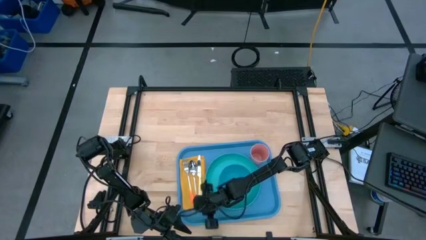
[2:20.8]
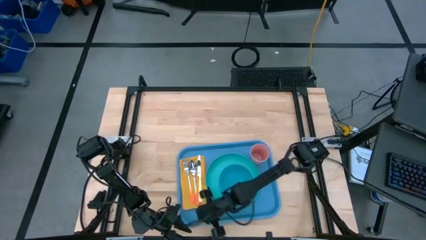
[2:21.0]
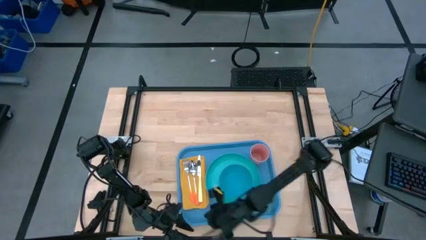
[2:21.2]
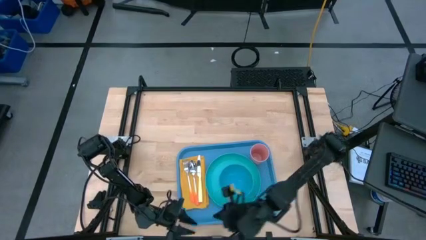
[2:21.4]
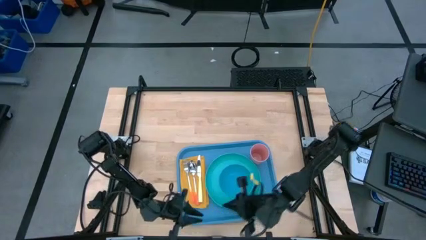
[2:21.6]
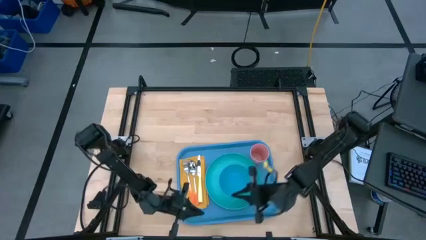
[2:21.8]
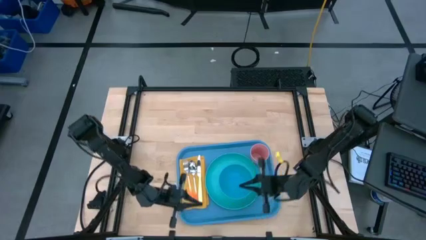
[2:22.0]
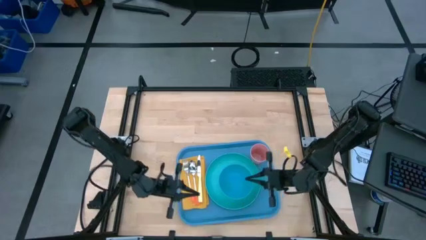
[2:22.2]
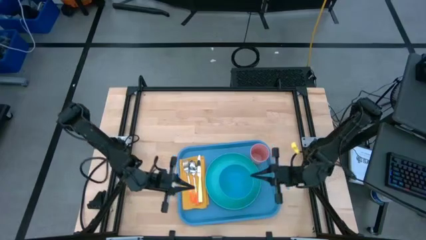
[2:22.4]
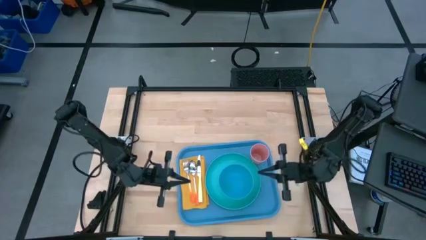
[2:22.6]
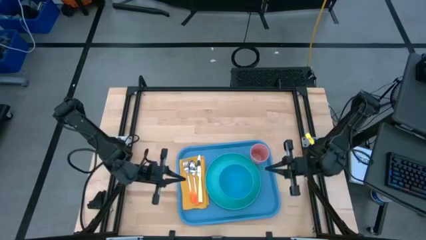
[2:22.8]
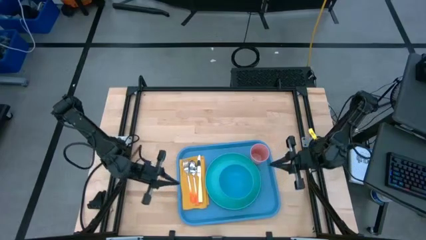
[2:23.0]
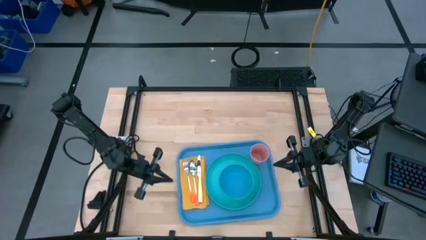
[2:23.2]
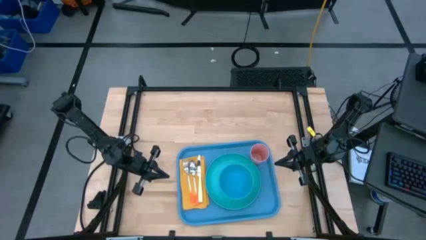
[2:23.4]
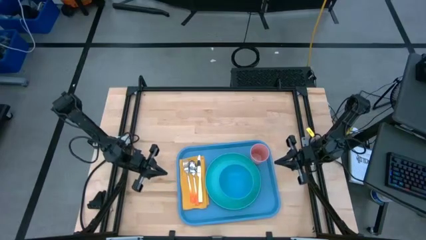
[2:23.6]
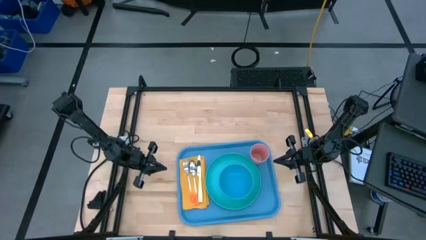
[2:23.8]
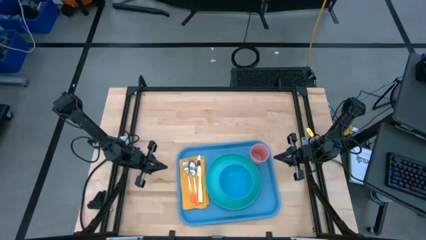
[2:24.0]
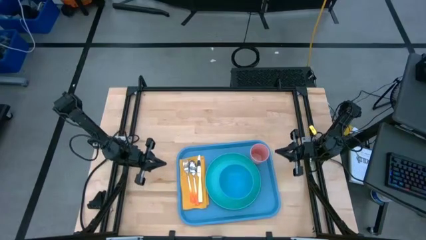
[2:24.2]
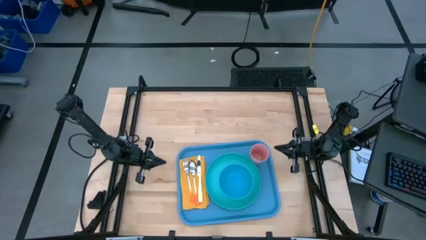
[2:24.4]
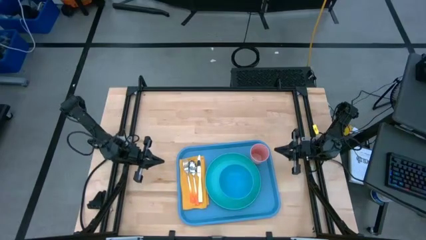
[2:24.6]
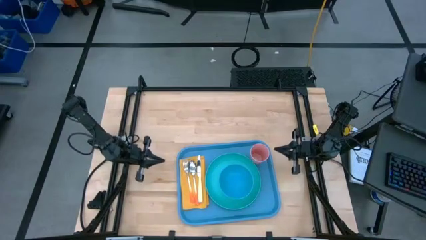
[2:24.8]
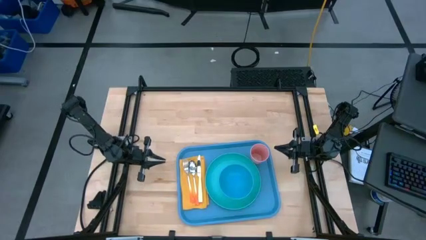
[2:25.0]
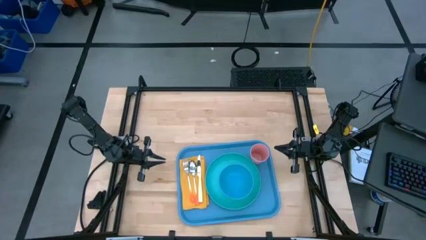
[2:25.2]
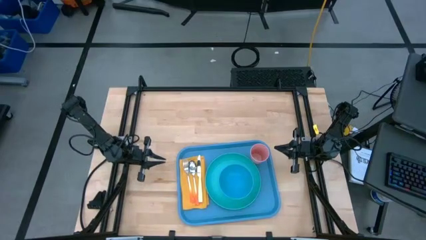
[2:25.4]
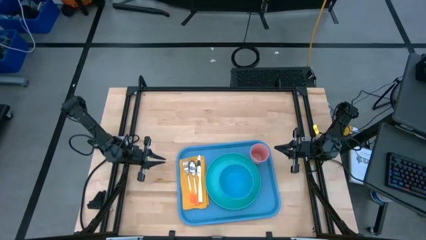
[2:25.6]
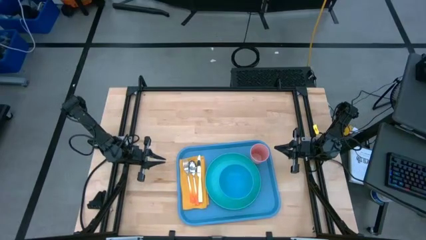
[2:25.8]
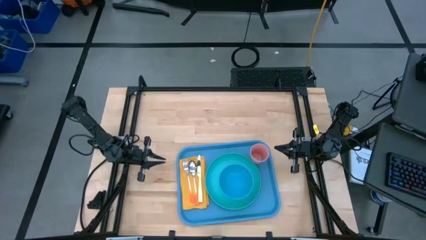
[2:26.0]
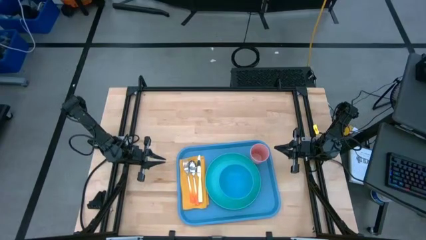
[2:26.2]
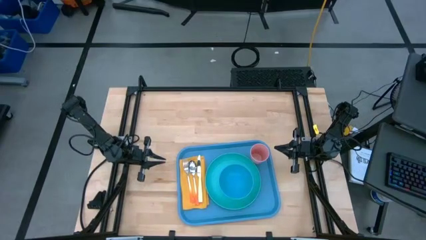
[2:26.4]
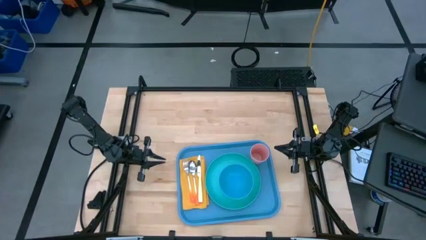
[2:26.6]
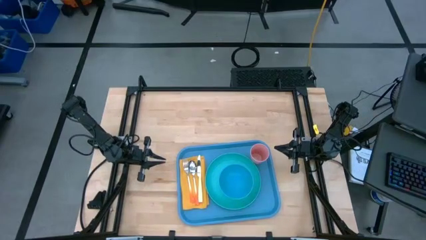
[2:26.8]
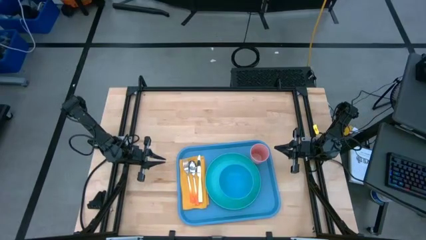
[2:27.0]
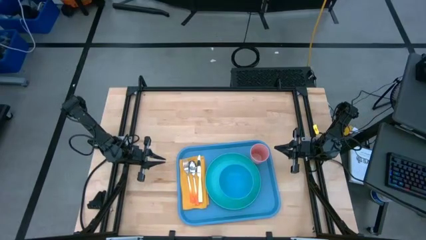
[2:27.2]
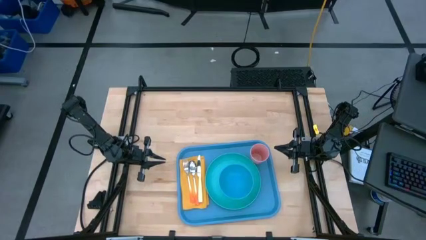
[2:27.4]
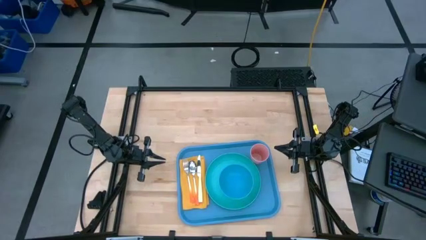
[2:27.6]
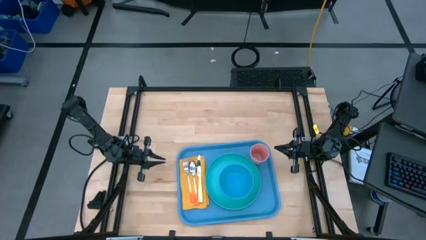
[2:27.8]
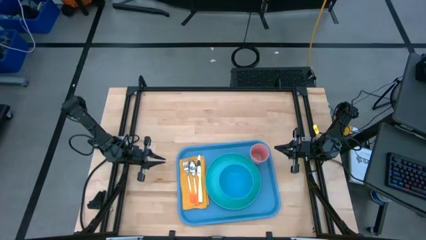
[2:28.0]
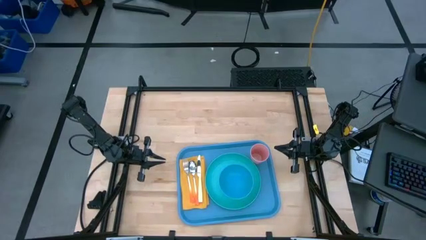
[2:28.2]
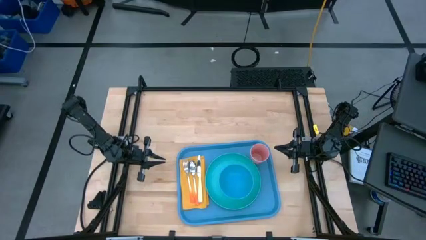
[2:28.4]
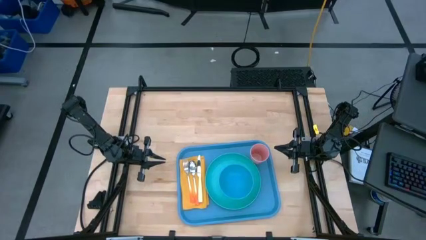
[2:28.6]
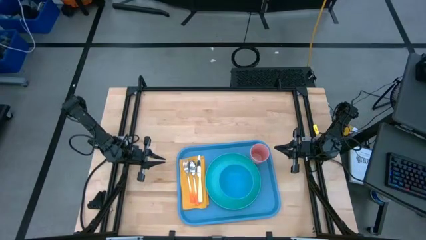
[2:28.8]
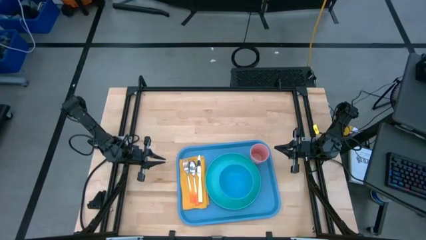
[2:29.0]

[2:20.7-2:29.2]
Task: Set up tray
Return to Home Position

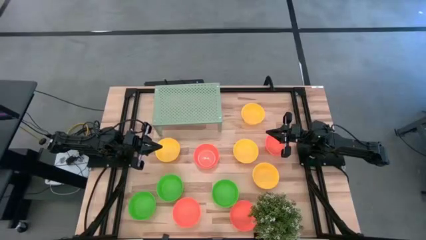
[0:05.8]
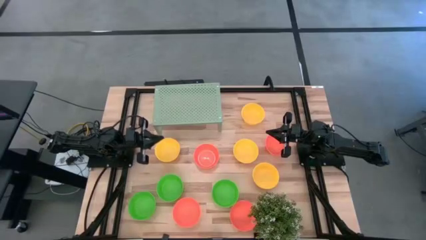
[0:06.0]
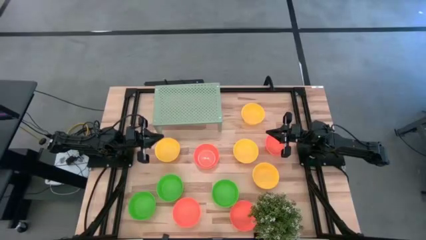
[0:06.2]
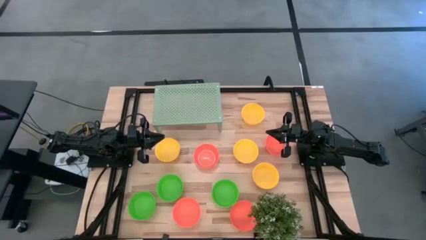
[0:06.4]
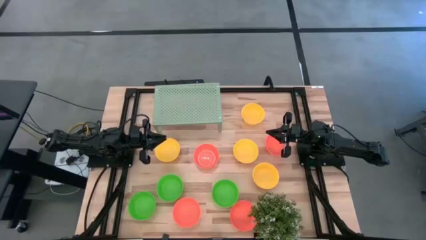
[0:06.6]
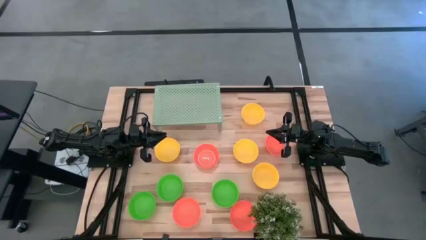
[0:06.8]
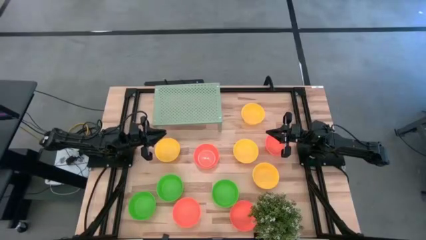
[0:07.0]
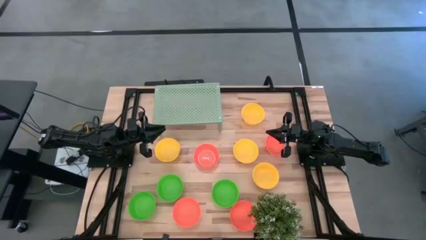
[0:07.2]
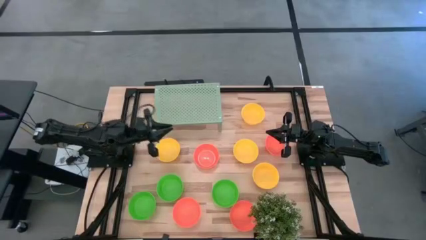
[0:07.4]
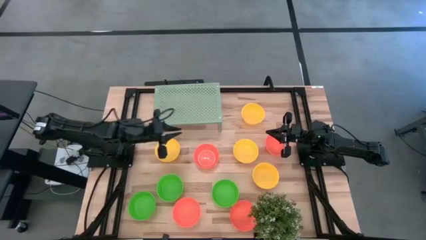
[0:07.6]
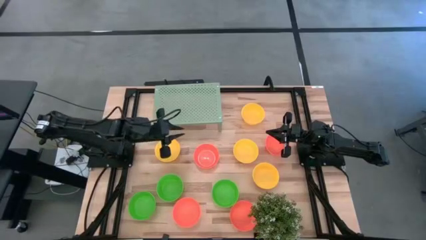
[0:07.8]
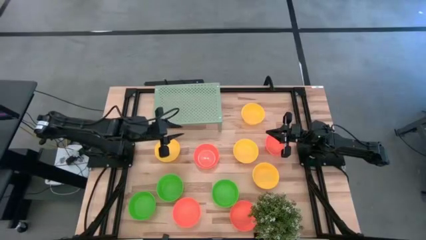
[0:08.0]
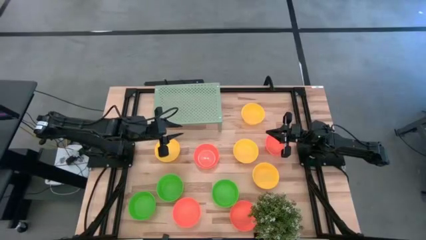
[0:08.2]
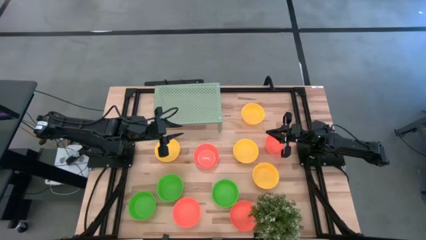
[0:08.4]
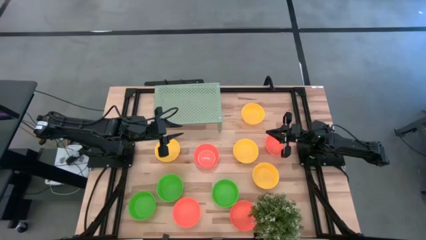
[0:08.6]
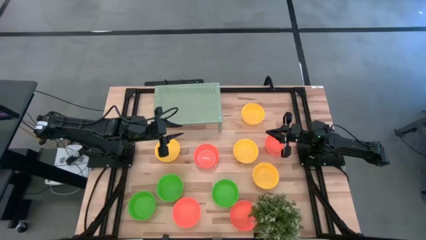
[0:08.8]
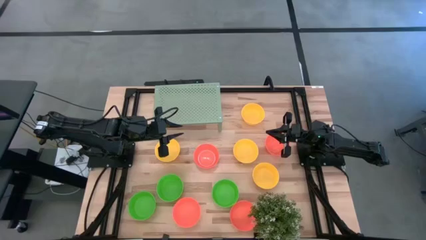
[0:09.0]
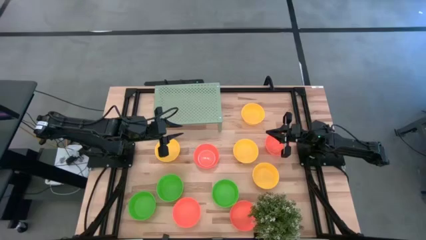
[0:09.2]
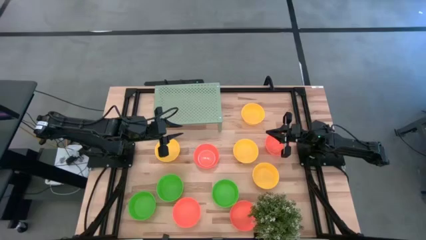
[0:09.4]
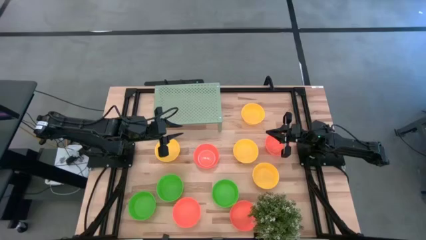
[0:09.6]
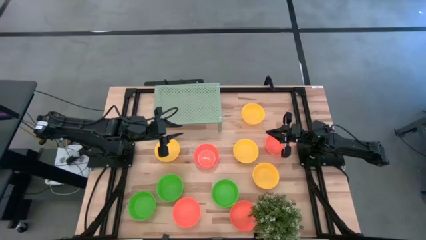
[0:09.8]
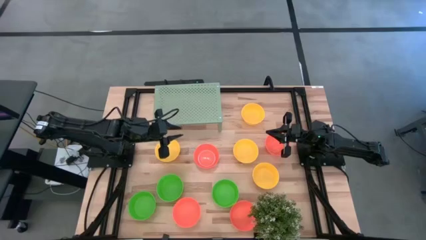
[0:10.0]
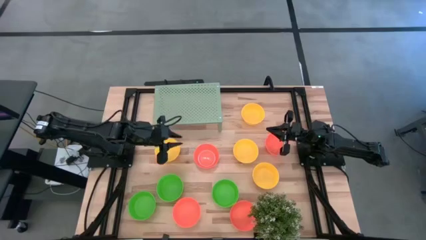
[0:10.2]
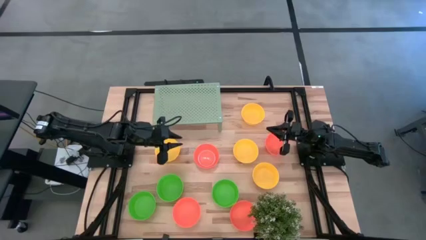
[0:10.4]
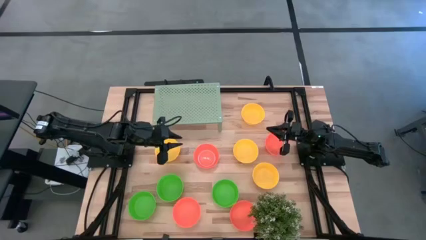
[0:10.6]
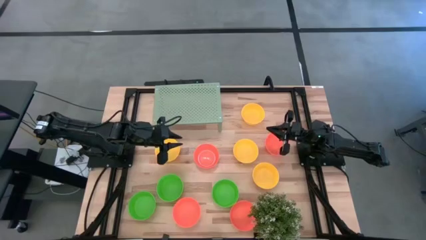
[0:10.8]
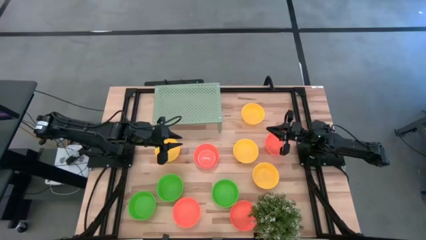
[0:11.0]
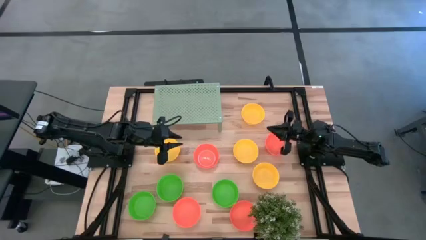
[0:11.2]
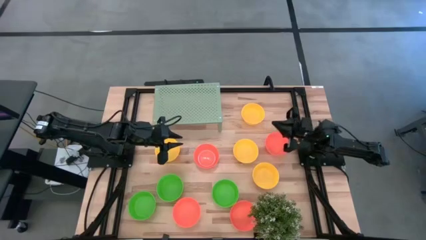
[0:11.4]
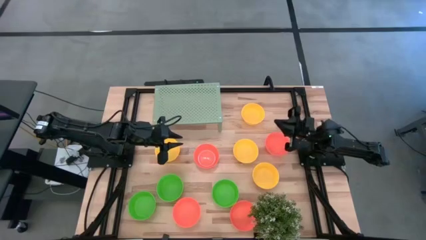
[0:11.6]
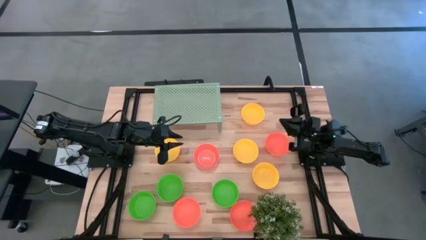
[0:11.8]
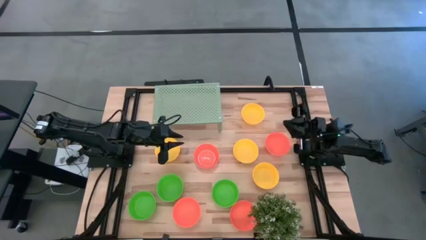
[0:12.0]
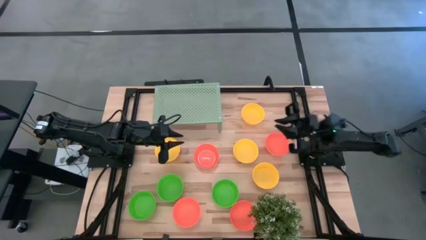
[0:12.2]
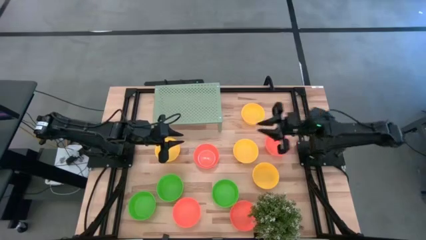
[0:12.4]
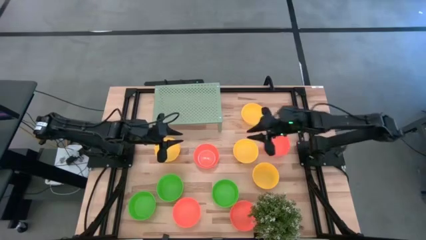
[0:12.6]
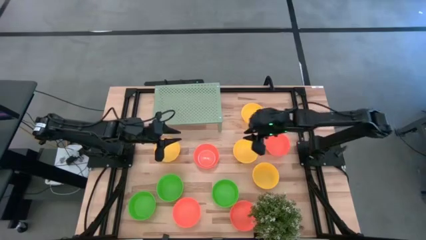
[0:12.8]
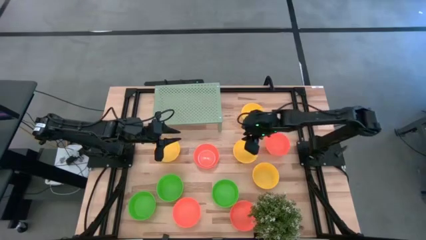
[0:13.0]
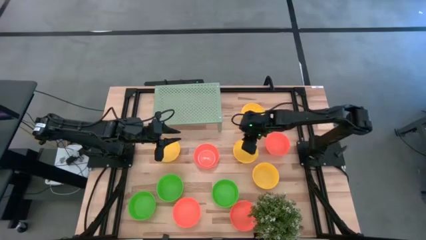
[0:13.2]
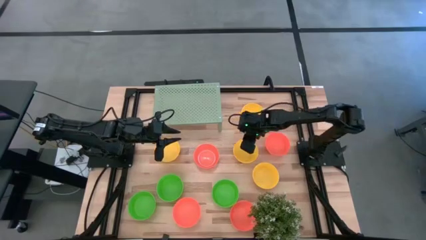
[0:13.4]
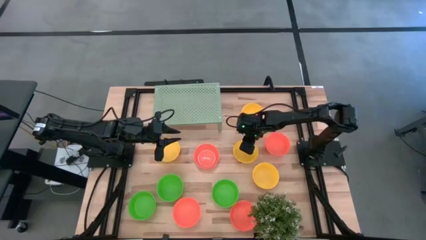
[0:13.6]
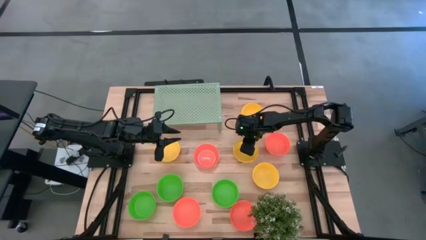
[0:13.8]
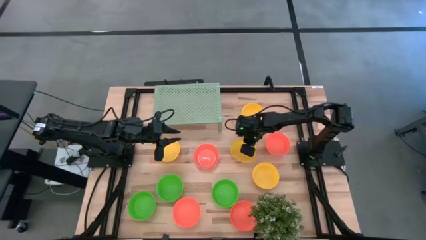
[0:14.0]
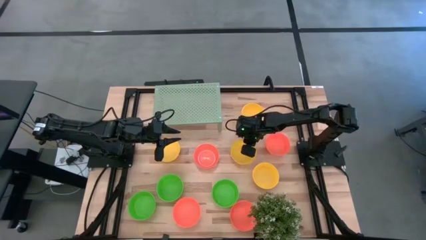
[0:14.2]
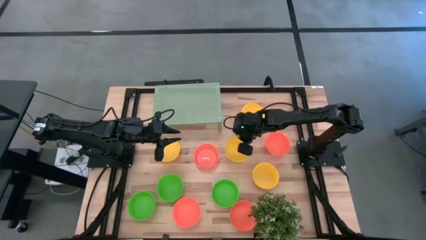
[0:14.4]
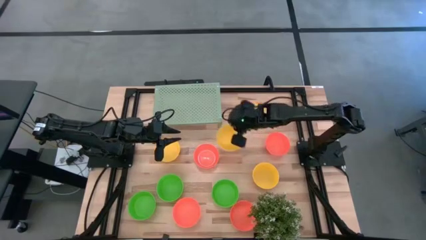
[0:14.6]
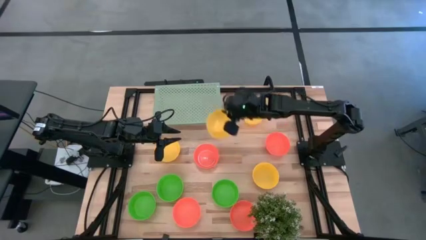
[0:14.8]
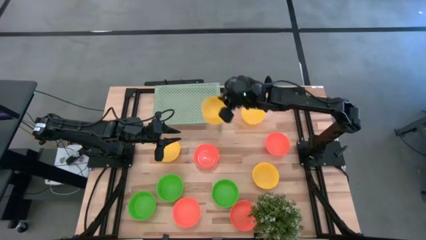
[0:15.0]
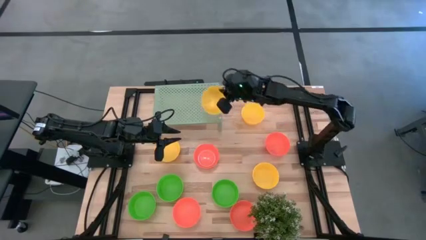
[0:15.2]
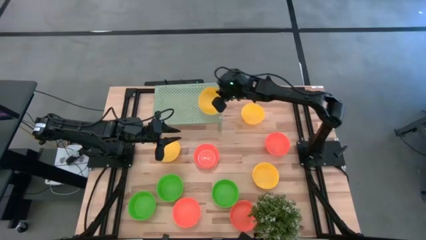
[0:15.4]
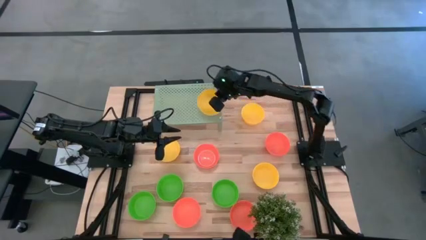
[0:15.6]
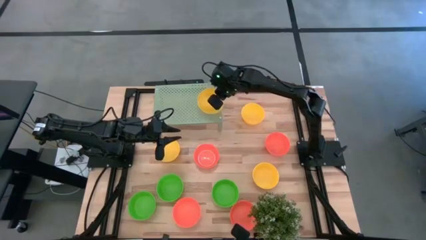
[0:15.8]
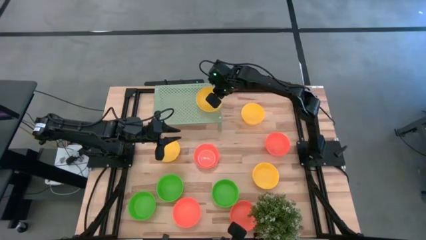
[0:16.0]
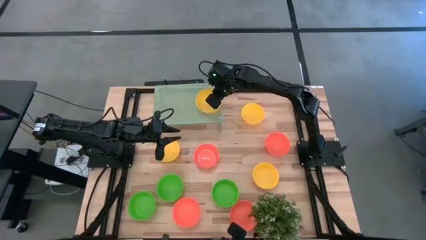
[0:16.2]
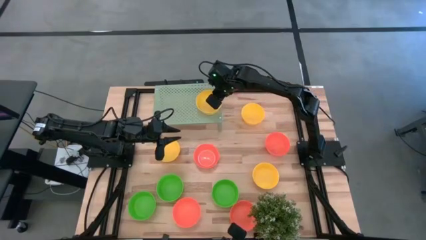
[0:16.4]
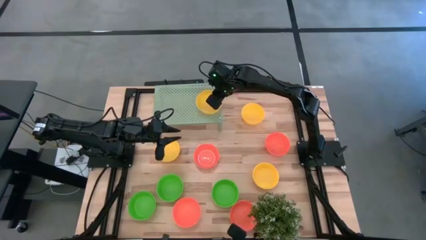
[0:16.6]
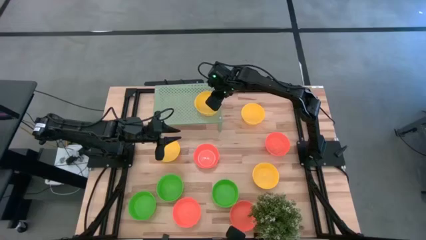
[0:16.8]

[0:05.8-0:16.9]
Task: Pick & Place Mini bowls
Put the yellow bowl on the shelf
